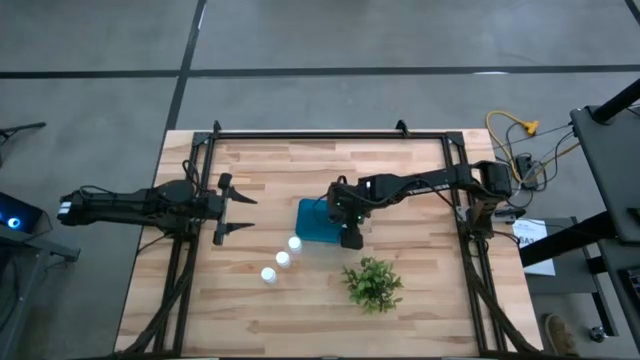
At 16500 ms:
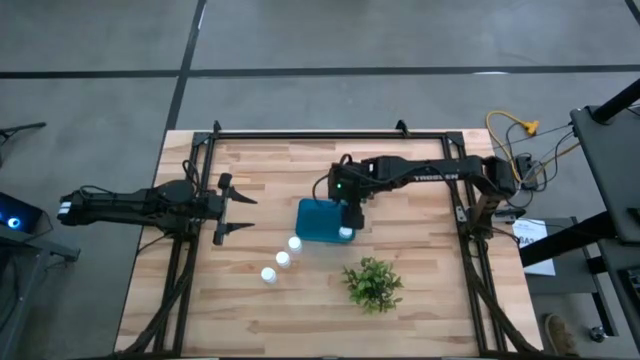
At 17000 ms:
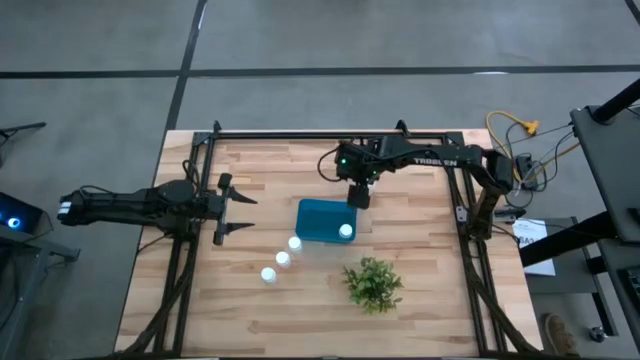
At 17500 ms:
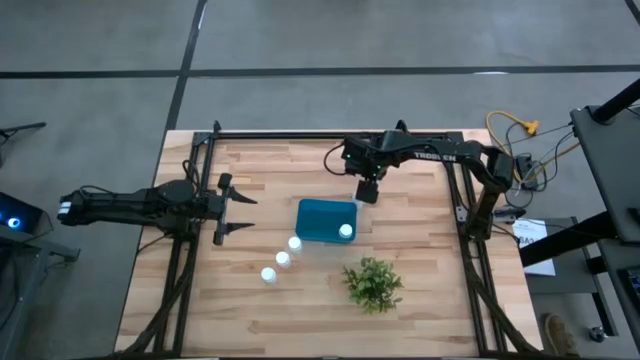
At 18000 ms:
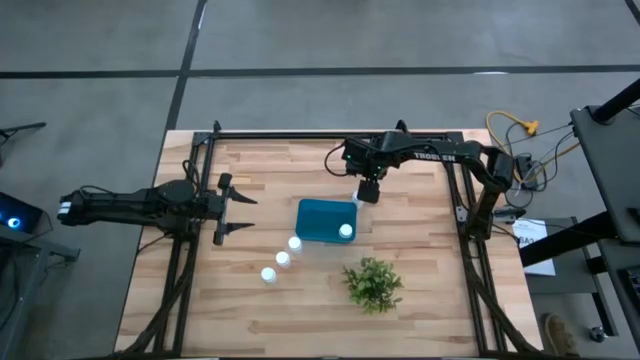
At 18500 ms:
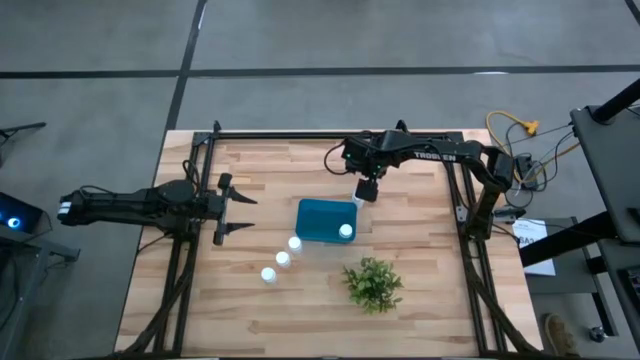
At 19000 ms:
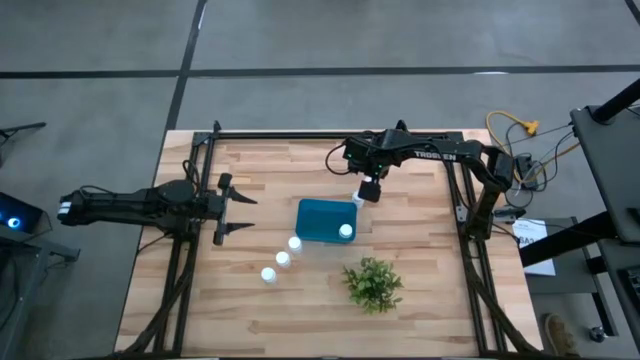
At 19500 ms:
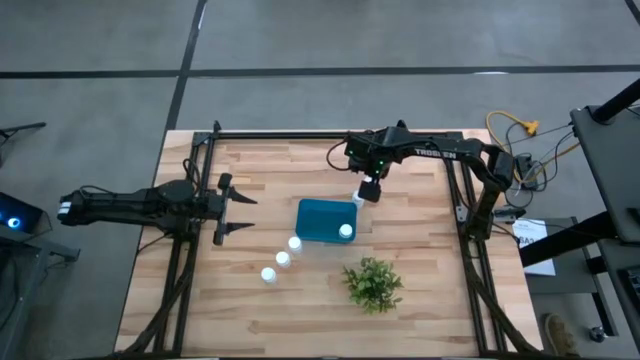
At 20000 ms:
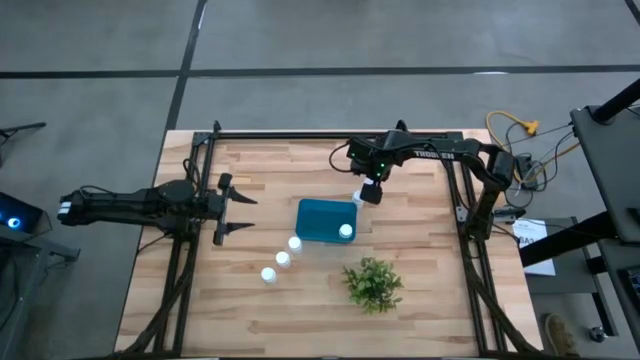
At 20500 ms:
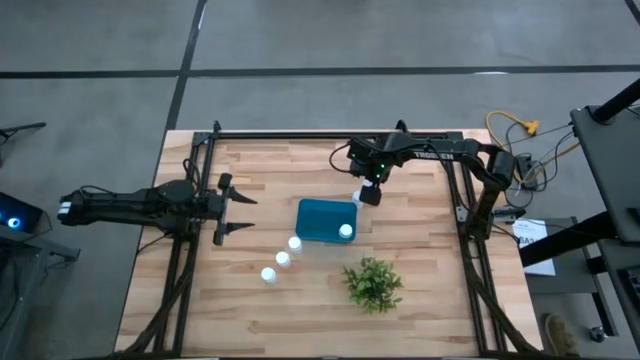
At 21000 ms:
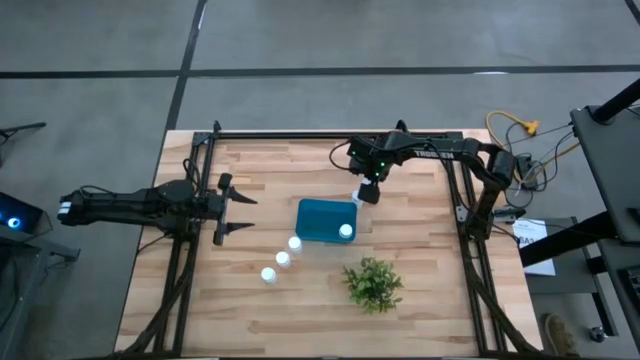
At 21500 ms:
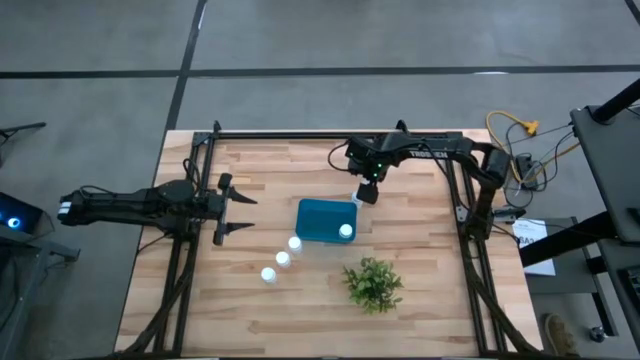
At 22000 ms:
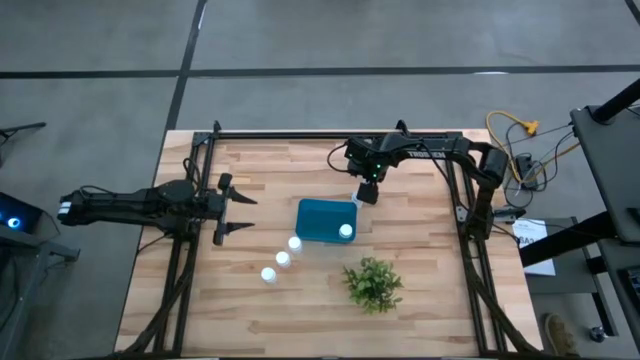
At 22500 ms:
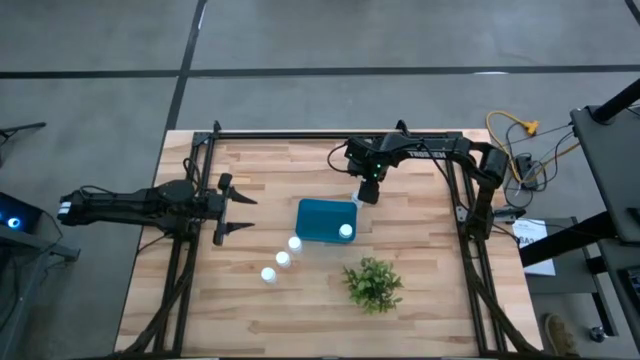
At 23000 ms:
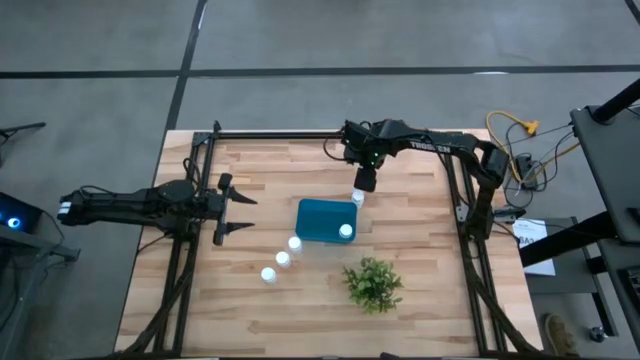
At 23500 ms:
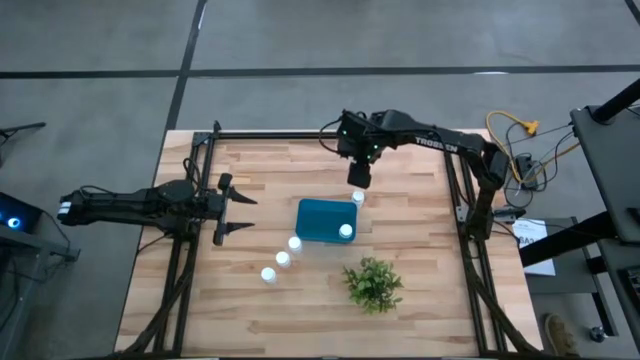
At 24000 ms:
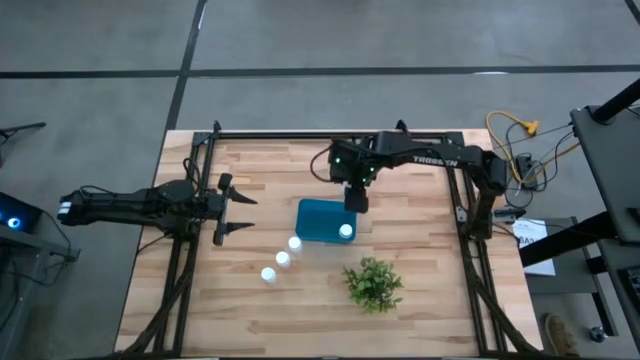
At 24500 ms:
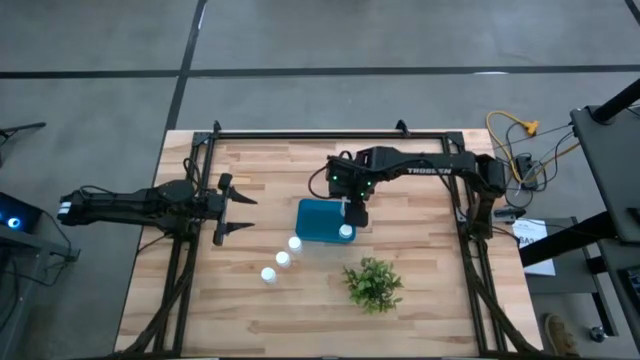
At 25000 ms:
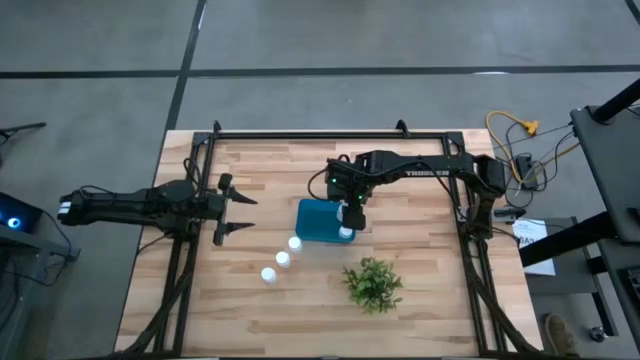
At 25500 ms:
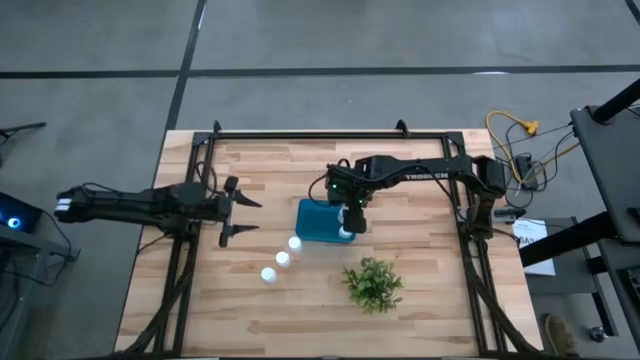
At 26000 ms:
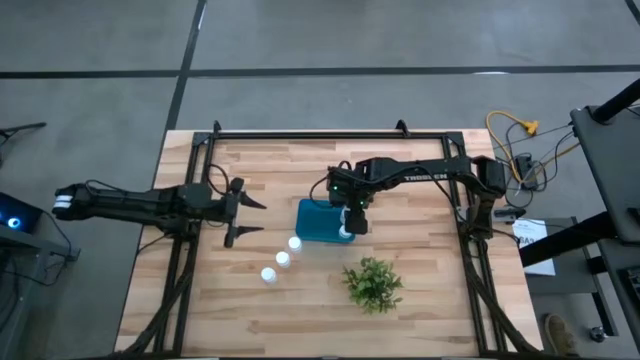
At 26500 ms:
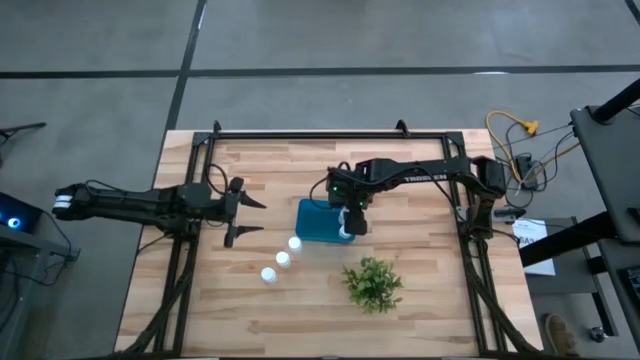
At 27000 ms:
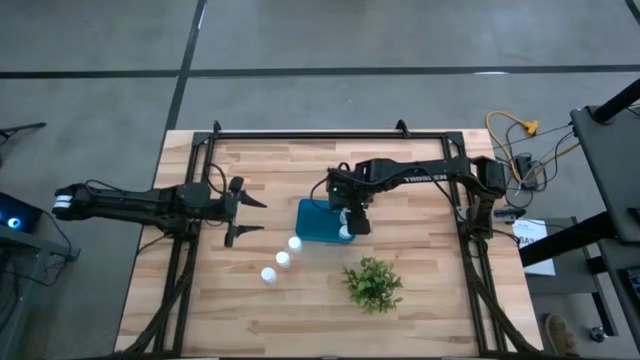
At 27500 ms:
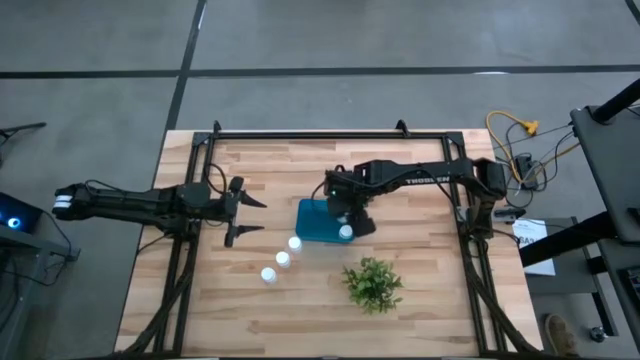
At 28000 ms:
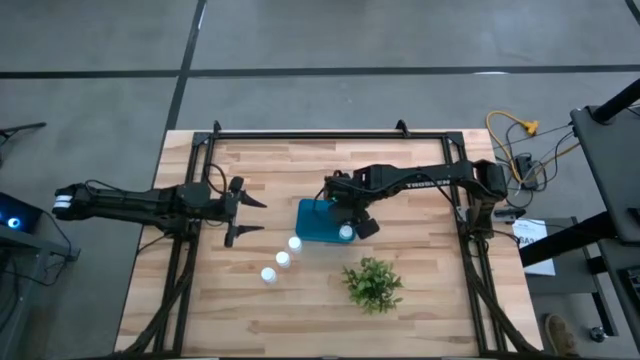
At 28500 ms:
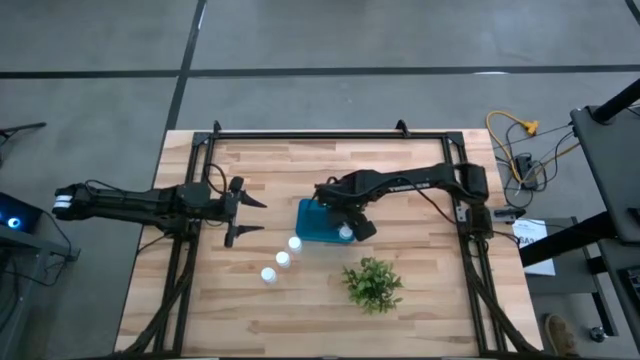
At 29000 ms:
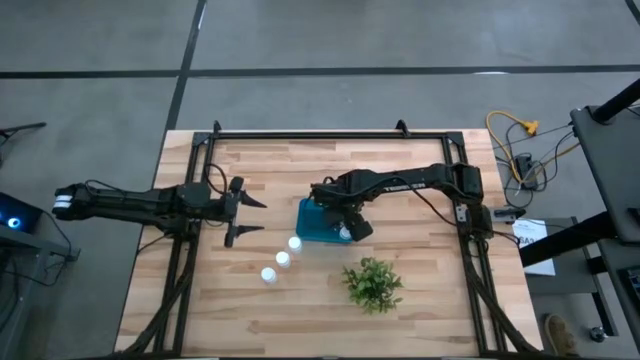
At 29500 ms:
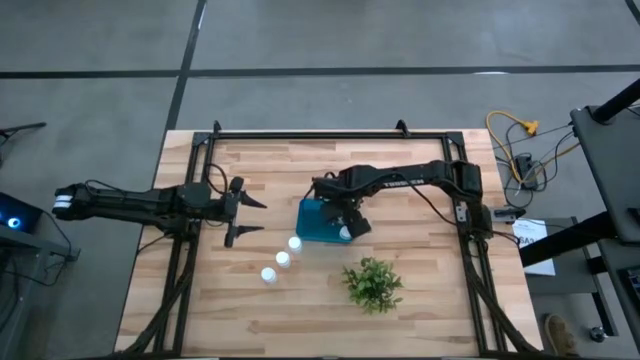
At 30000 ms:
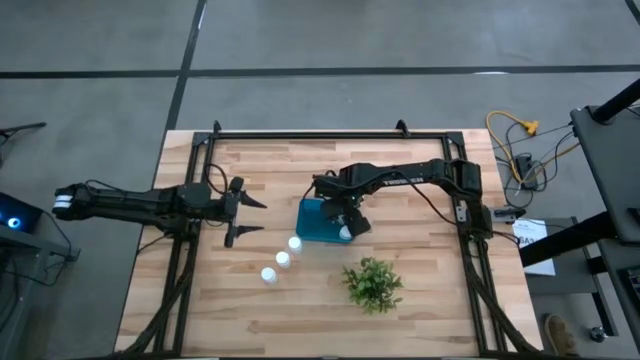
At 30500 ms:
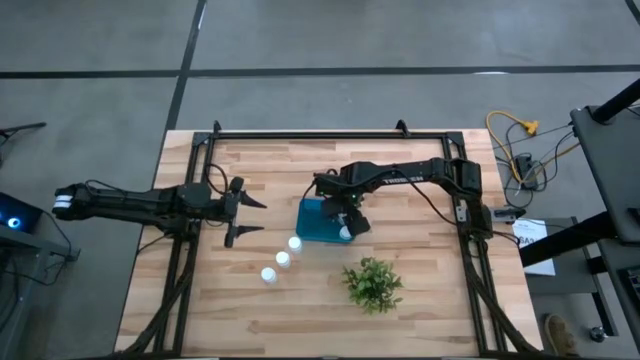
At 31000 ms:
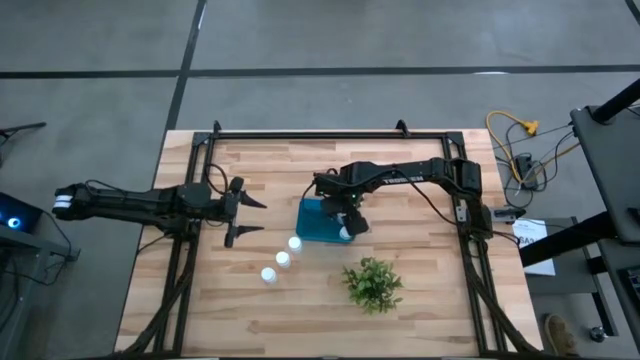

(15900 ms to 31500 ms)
Task: Pick and place pill bottles into a basket
Put the white pill bottle in the blue bin

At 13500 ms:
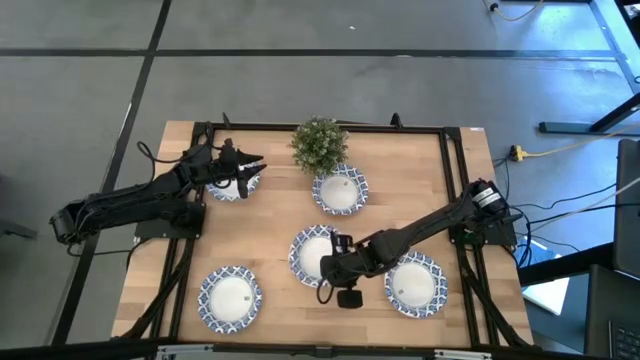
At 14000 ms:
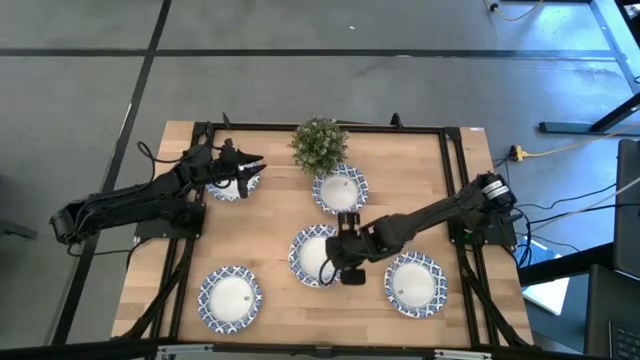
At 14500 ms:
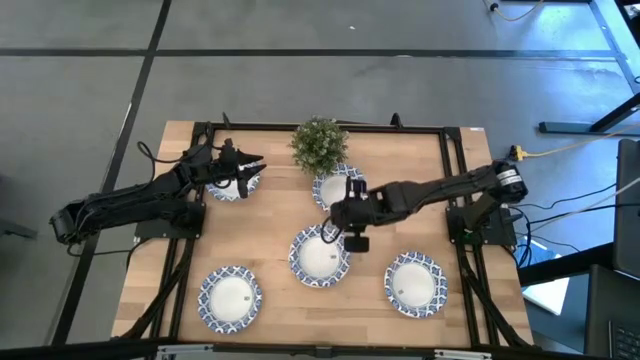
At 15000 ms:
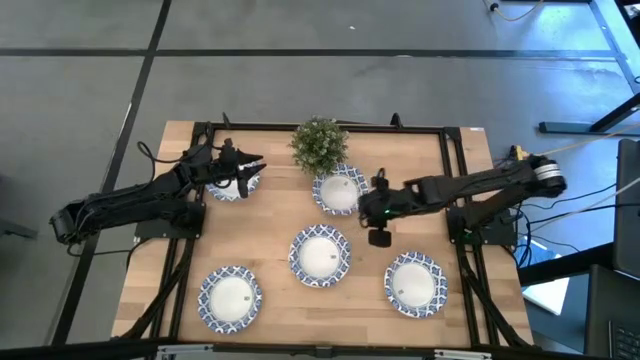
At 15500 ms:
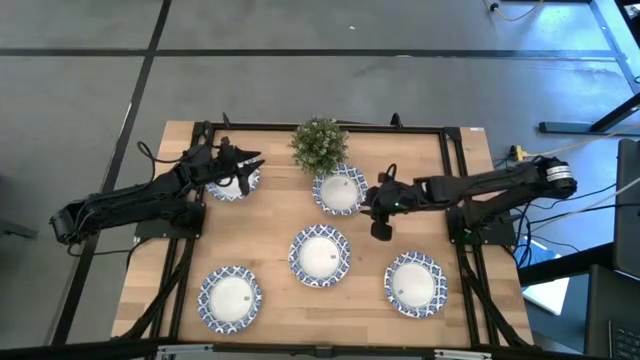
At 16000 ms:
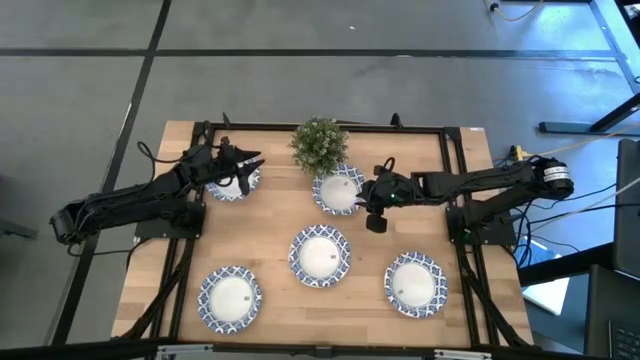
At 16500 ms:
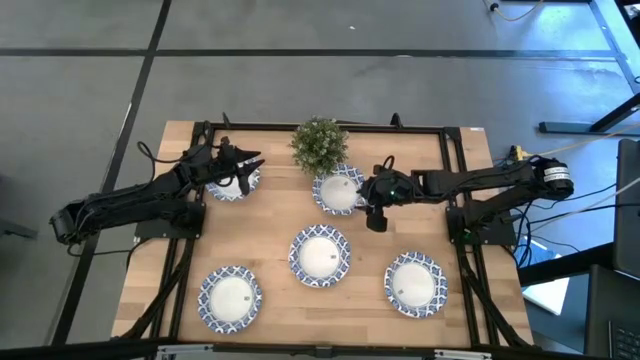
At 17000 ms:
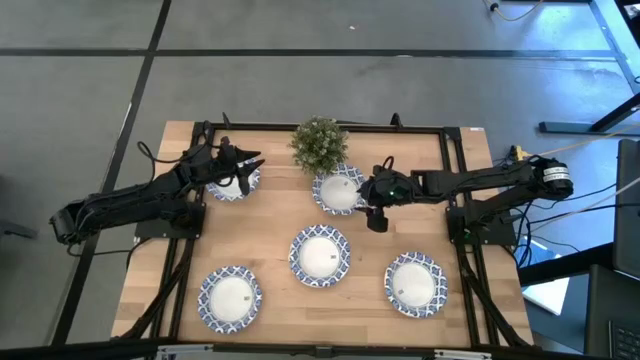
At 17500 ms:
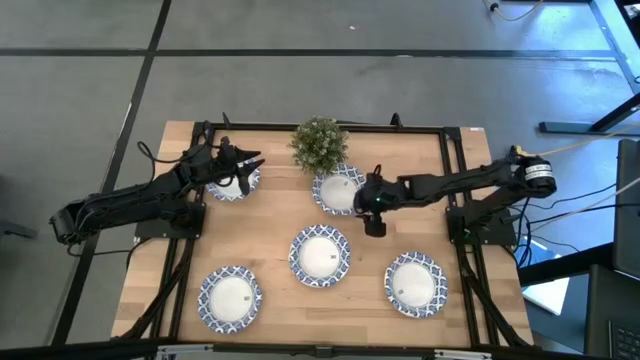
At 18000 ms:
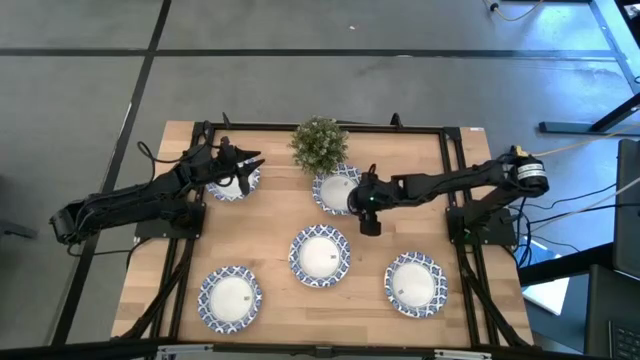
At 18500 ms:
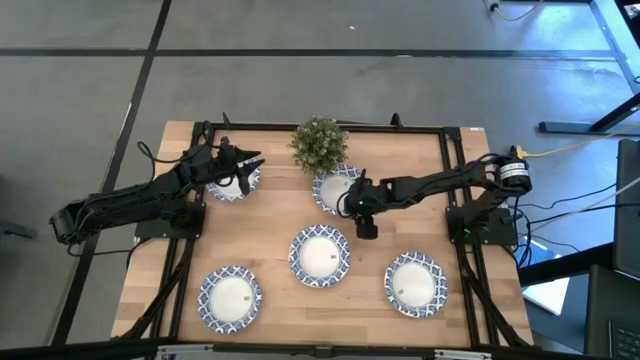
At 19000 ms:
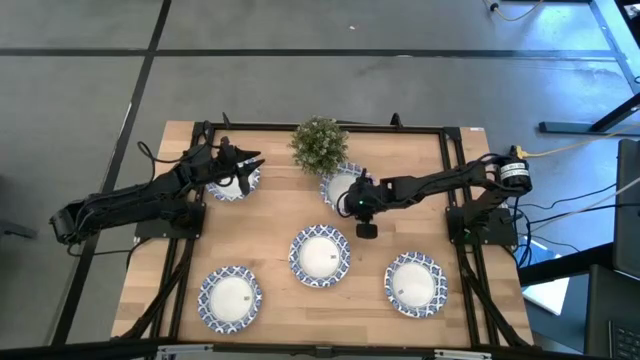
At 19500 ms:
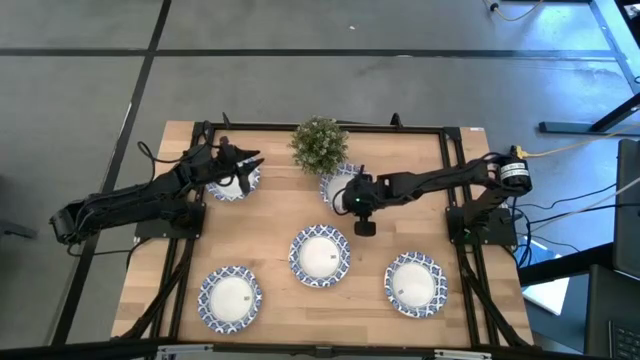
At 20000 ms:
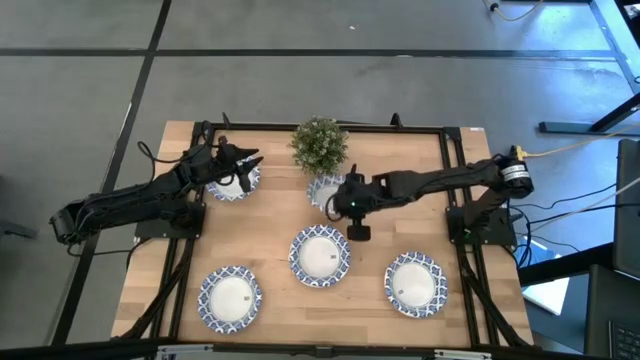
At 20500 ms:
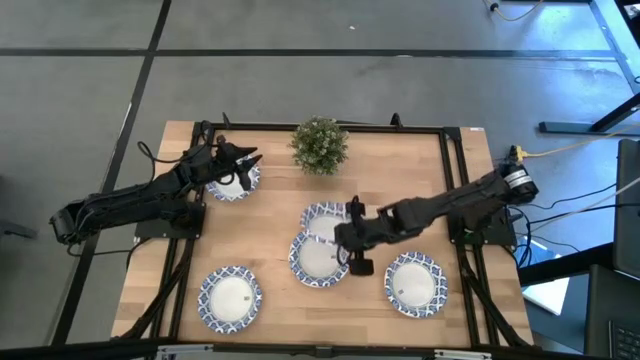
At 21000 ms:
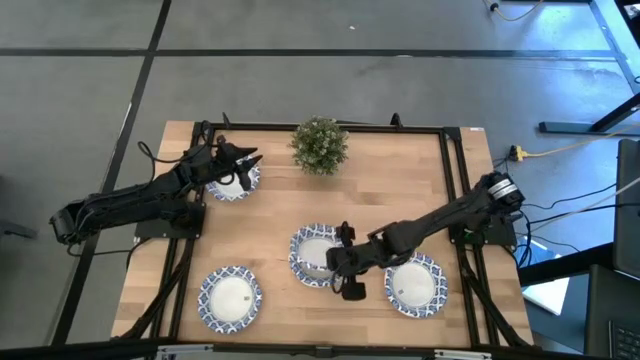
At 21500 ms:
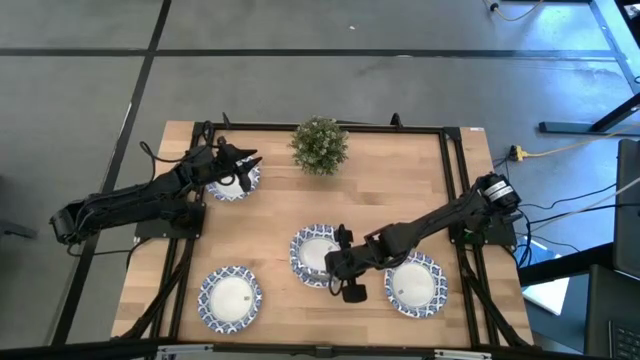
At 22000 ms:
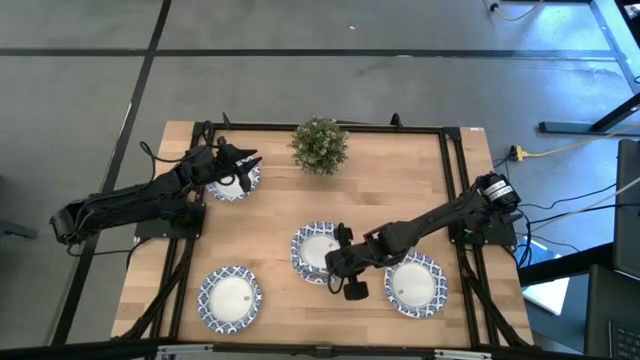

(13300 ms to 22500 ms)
Task: Nest bowls inside each other
Stack the blue pattern bowl on the blue pattern bowl
